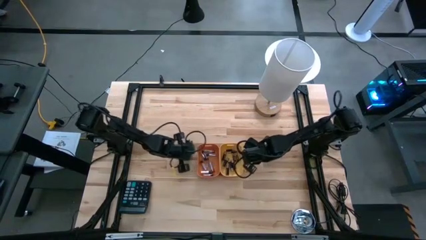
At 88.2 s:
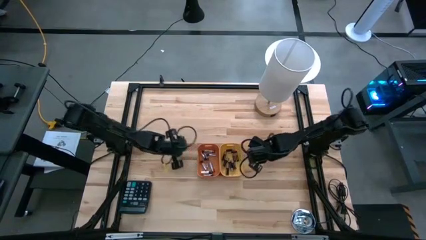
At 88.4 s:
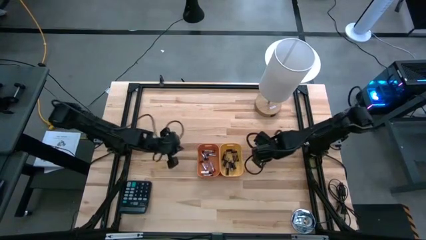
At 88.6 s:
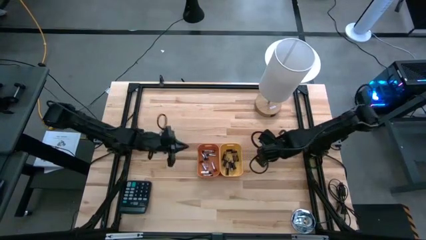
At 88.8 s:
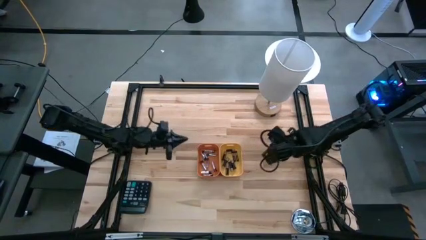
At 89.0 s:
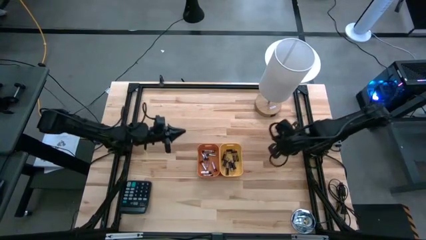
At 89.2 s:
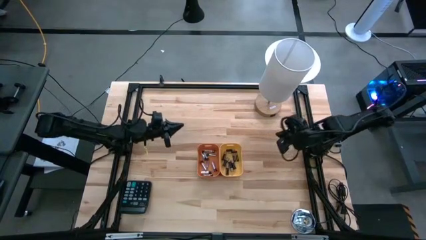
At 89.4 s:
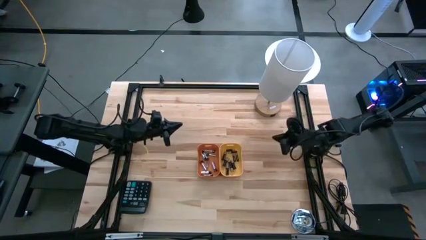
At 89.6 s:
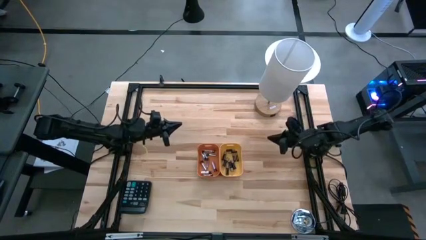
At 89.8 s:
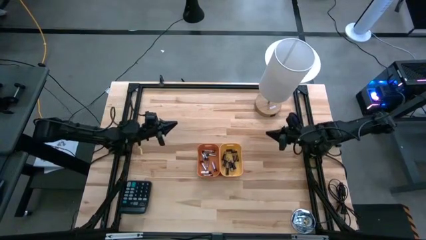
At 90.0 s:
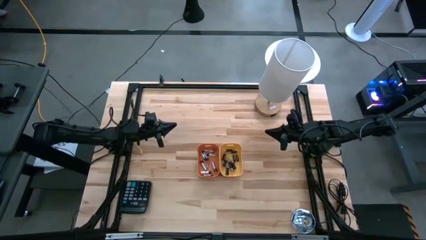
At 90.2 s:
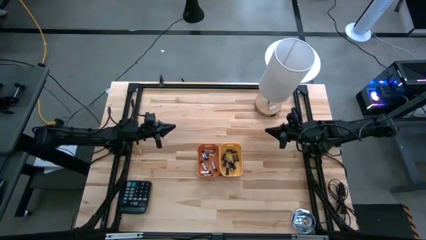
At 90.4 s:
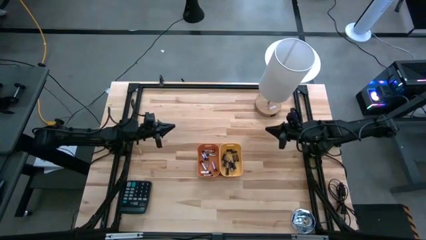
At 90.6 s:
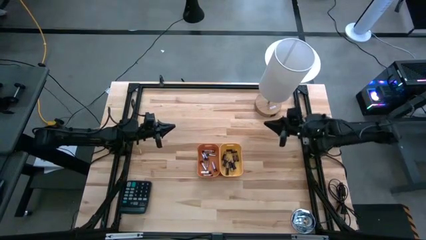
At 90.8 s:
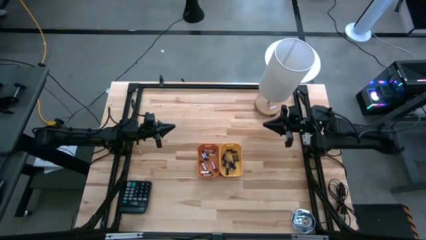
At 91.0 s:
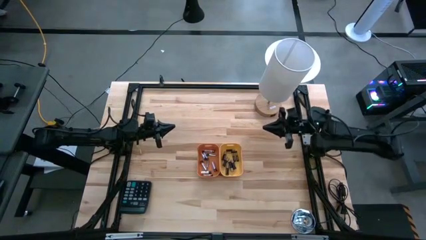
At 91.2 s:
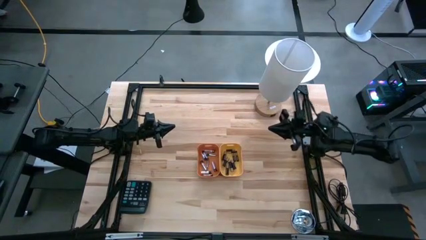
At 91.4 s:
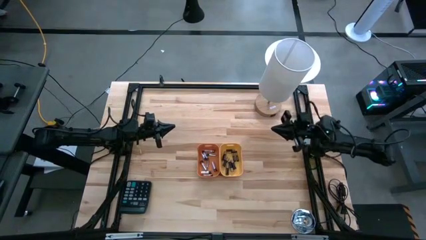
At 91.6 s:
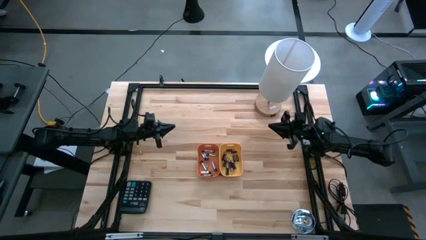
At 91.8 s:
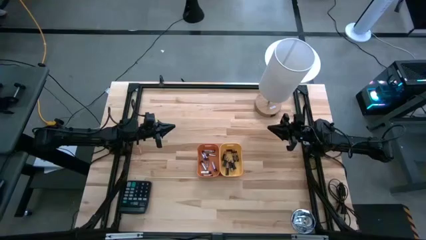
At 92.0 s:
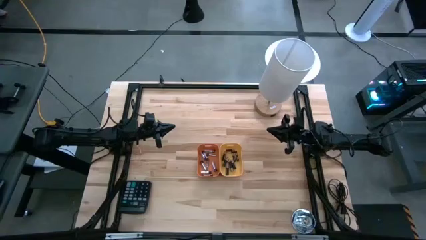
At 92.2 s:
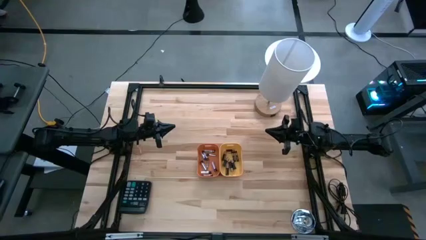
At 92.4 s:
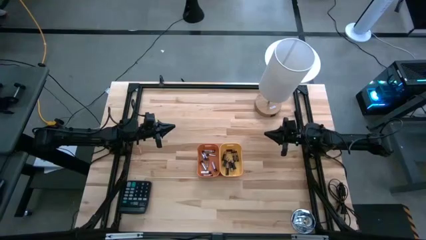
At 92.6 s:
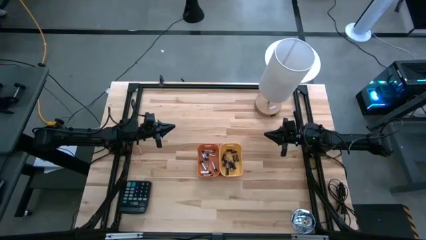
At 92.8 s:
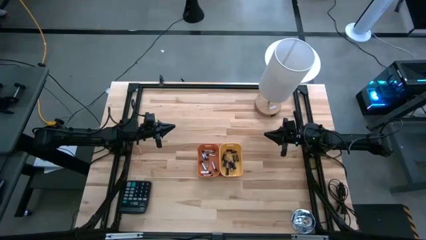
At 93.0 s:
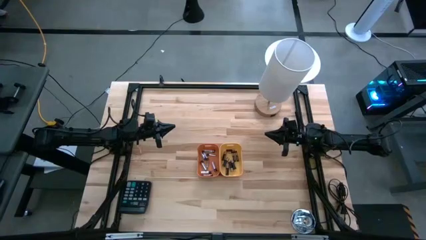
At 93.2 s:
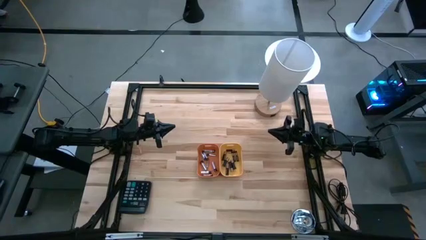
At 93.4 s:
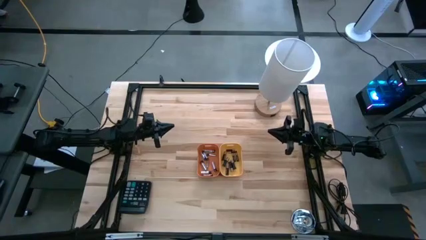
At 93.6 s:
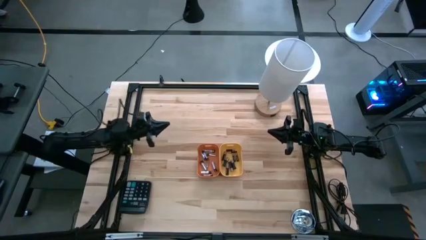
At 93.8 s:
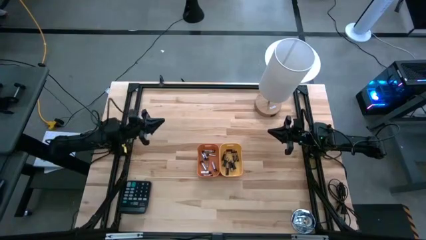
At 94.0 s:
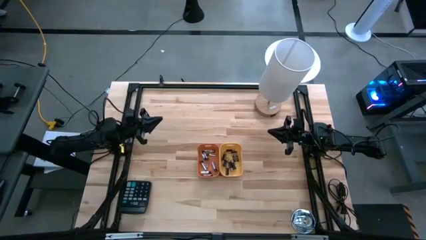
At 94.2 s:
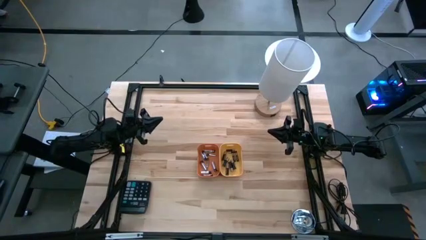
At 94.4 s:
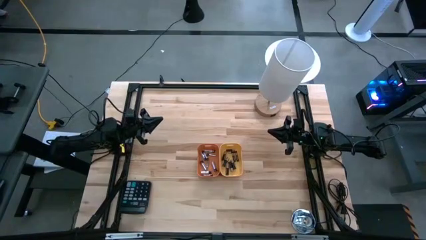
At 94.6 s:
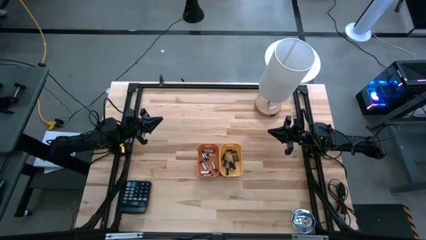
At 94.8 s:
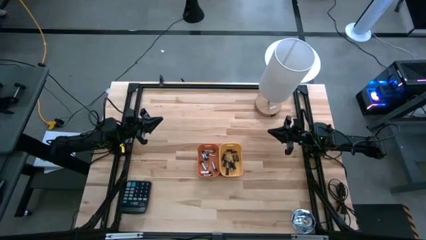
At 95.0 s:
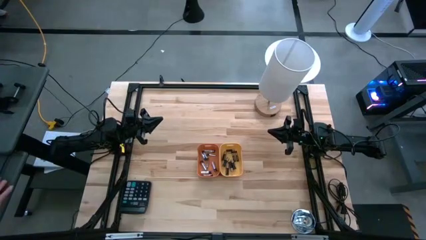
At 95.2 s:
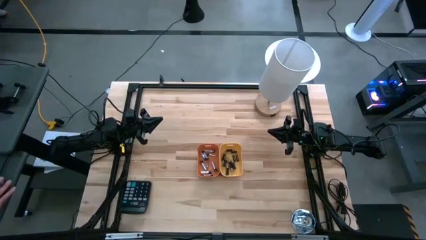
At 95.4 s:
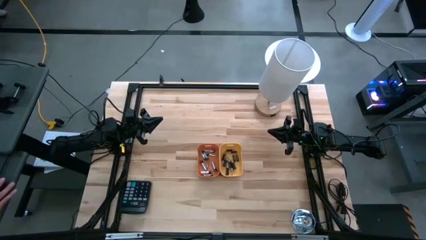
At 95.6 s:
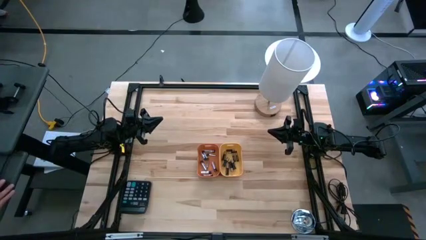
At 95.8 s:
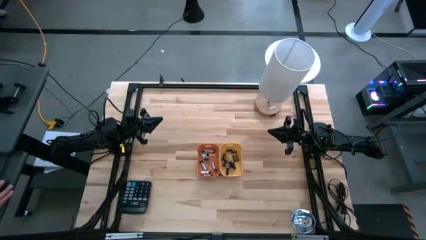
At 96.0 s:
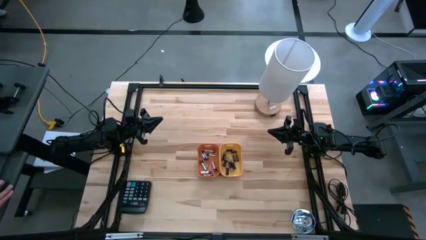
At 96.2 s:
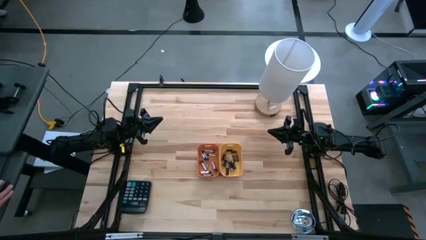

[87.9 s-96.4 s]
Task: Sort batteries
Return to Home Position

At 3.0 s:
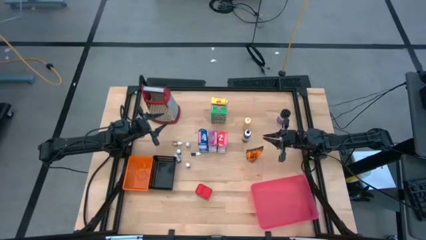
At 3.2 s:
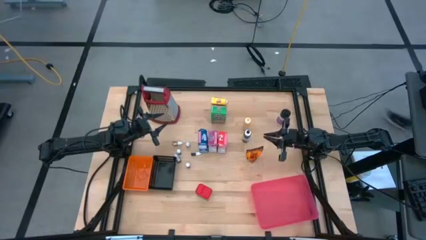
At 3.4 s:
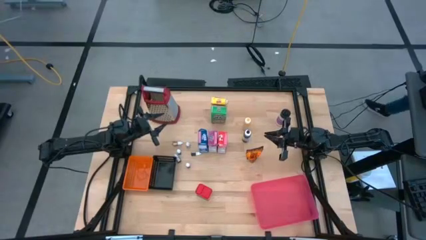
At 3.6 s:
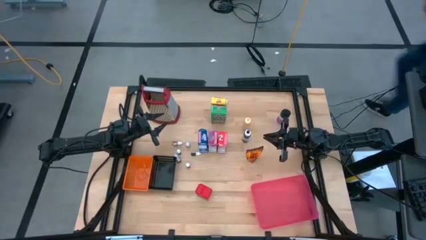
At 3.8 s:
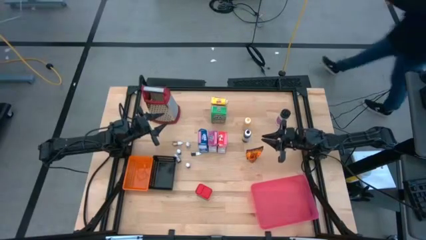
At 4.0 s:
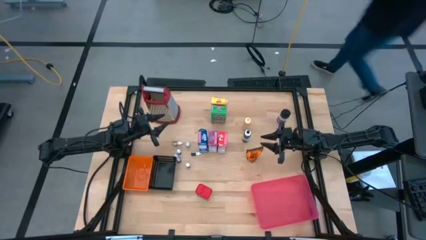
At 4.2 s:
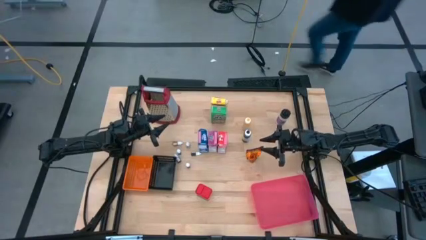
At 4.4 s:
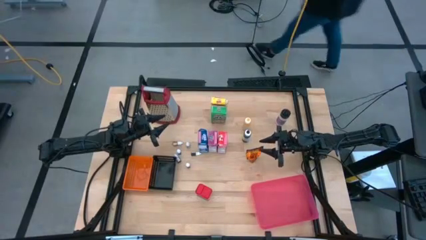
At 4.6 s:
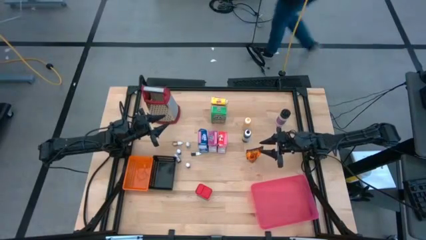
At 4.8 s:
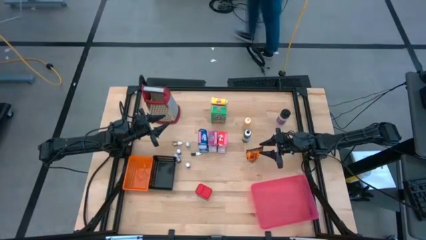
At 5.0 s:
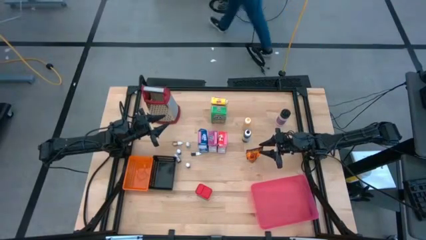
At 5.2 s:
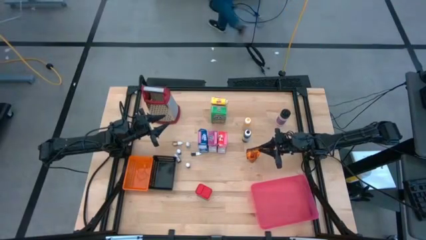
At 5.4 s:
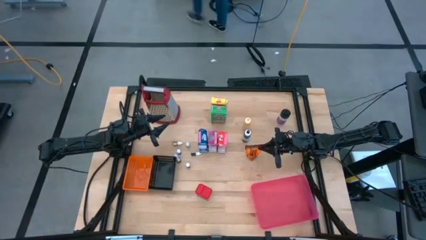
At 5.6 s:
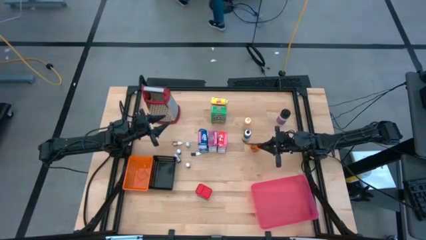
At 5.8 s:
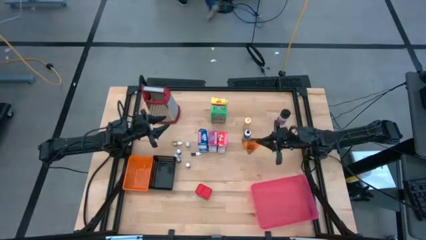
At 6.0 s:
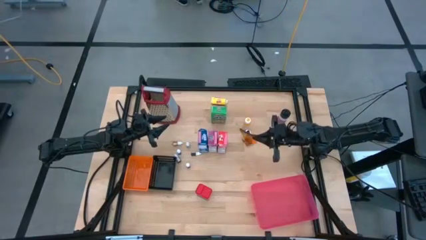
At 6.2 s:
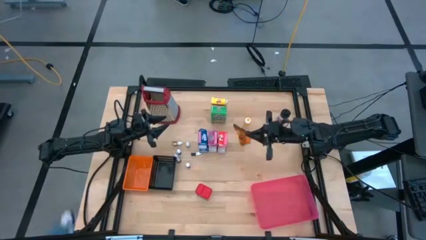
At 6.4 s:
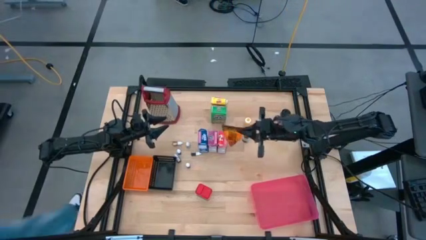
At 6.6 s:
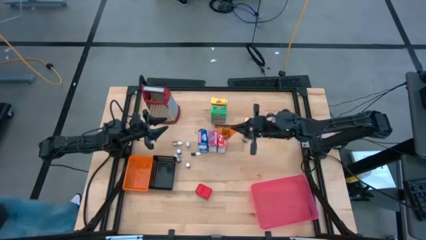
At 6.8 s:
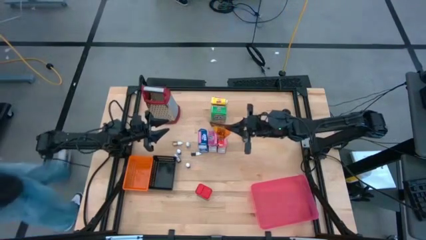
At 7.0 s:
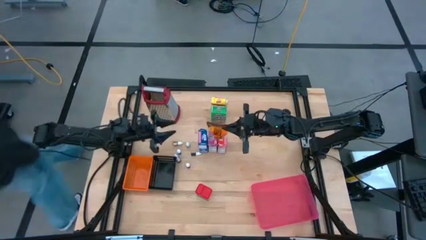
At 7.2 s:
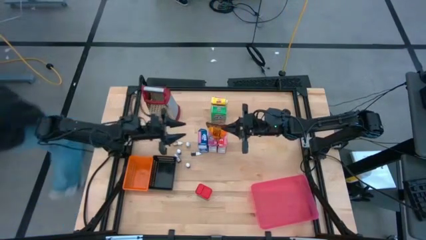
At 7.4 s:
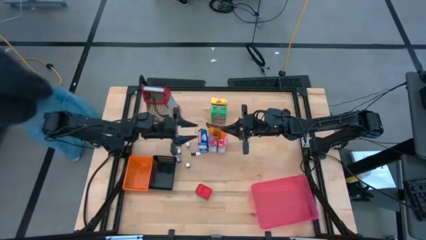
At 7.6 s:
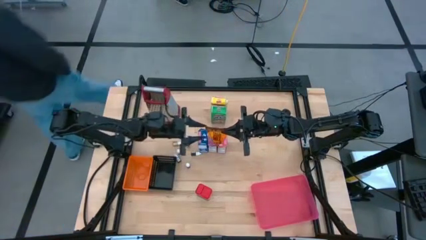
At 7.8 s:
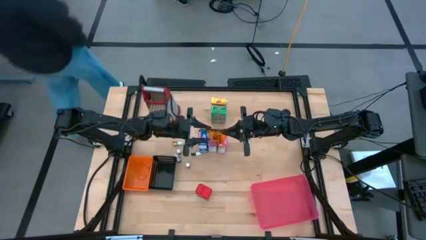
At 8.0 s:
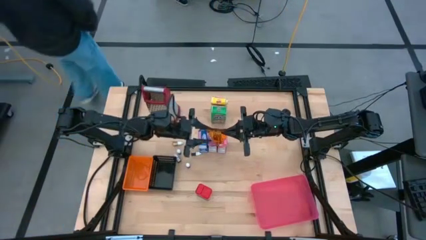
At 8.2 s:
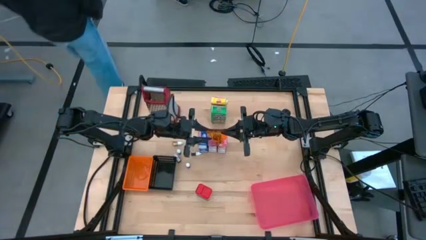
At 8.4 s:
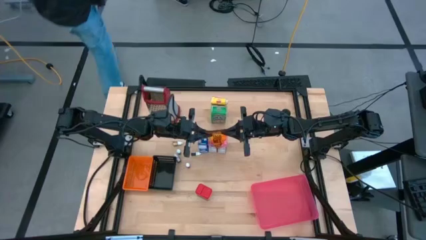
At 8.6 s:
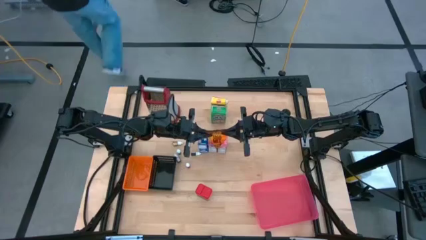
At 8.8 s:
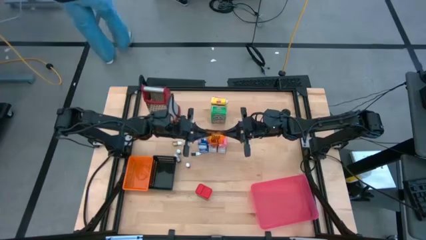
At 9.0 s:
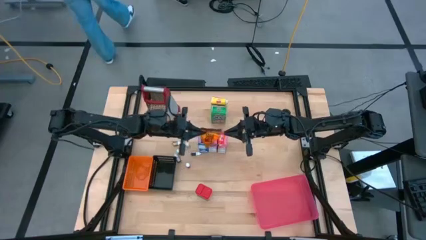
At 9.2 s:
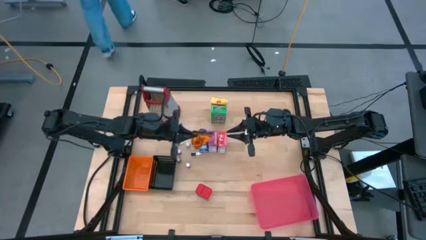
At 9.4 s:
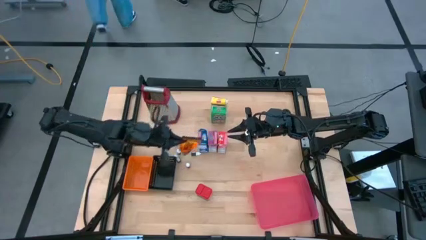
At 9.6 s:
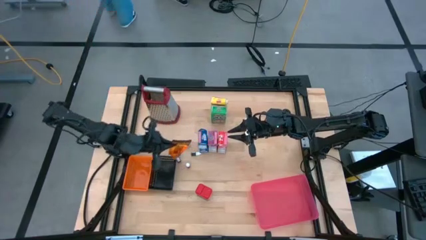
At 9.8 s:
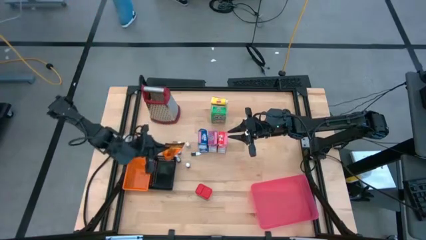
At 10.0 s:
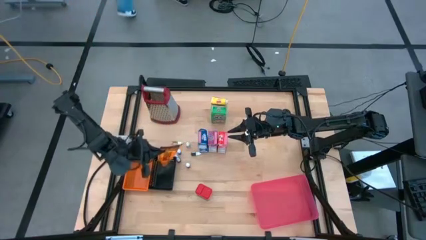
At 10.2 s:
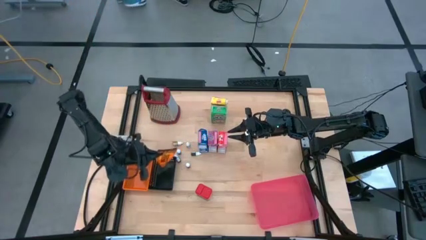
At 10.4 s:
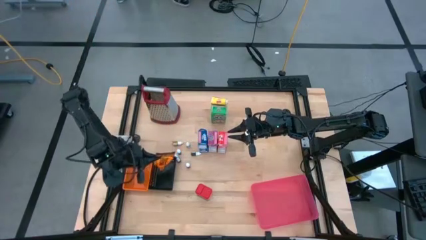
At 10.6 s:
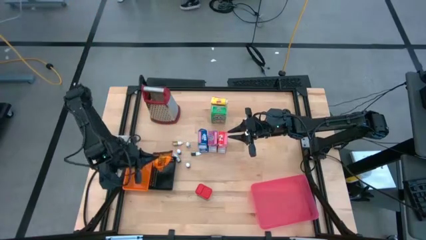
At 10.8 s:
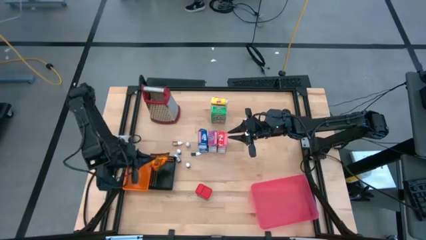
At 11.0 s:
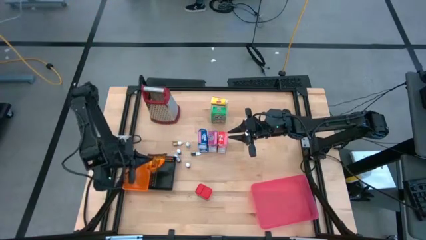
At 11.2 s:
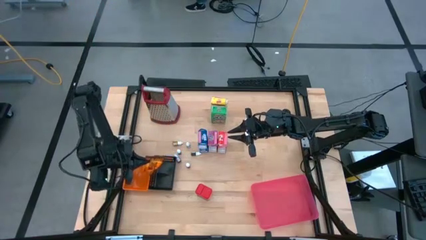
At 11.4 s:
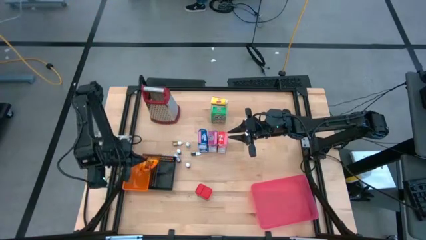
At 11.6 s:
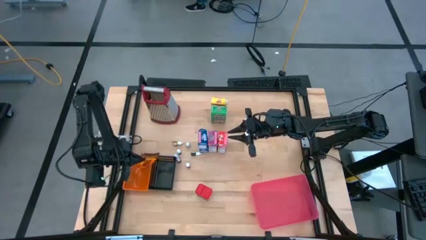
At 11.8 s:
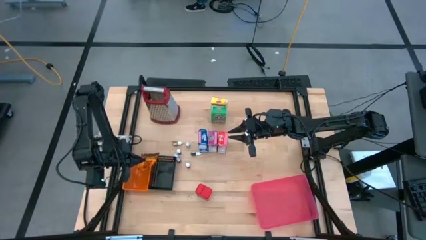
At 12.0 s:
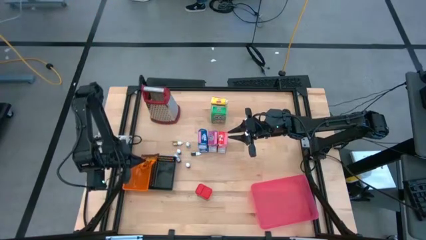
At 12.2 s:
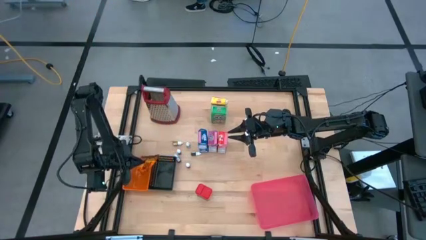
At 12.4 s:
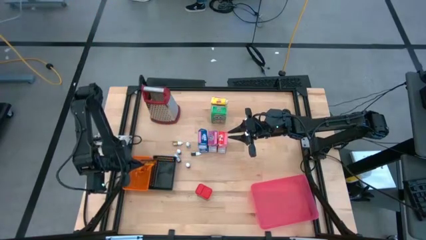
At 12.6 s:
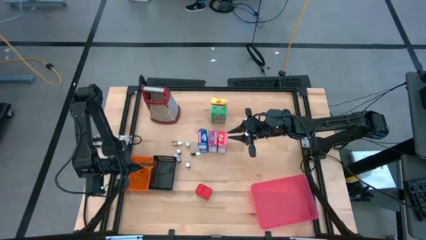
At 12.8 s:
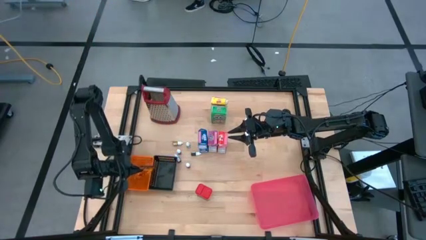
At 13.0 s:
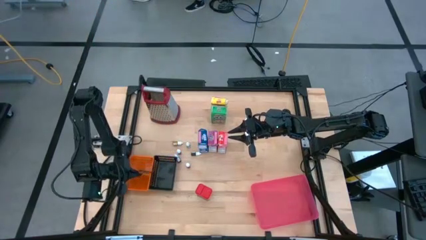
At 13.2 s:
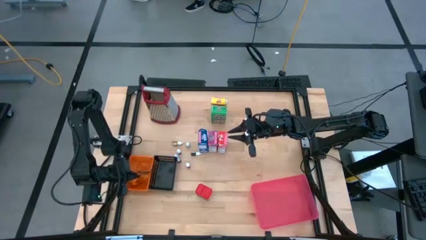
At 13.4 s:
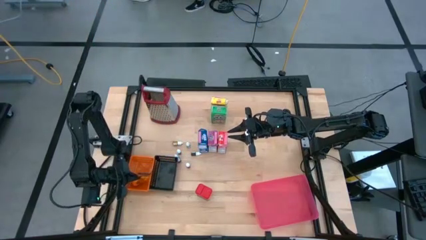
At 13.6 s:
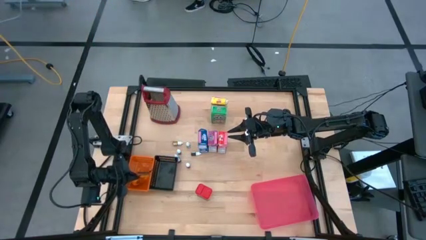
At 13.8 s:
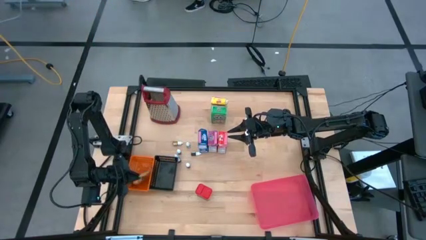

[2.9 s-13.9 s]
Task: Pick & Place Kitchen Items
Put the orange spice pack into the orange bin
